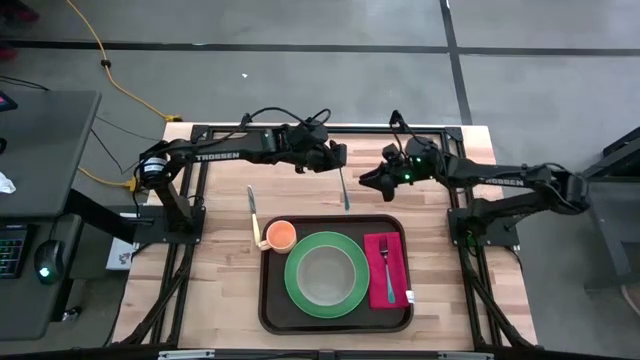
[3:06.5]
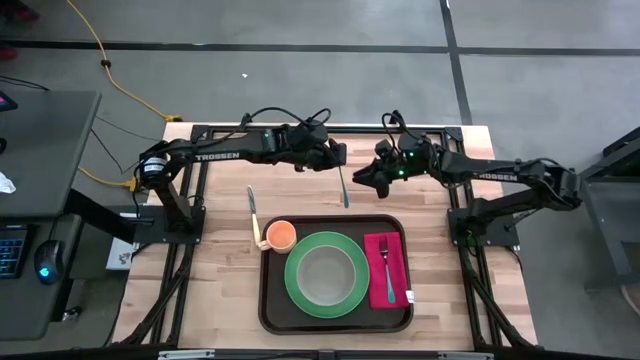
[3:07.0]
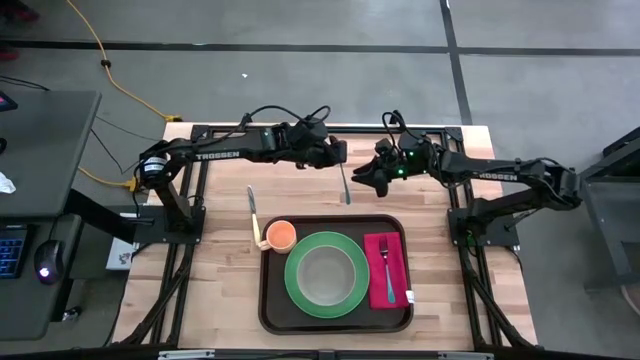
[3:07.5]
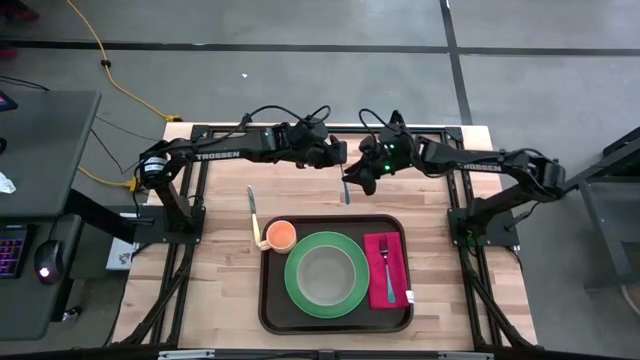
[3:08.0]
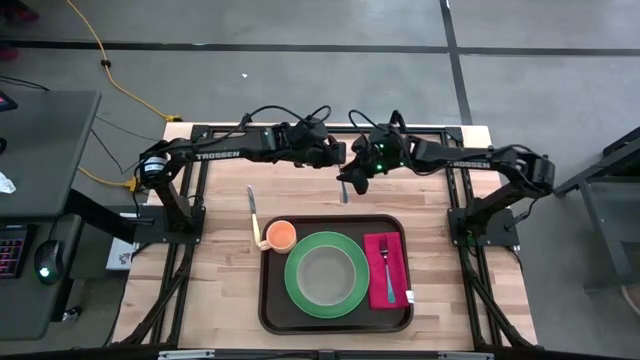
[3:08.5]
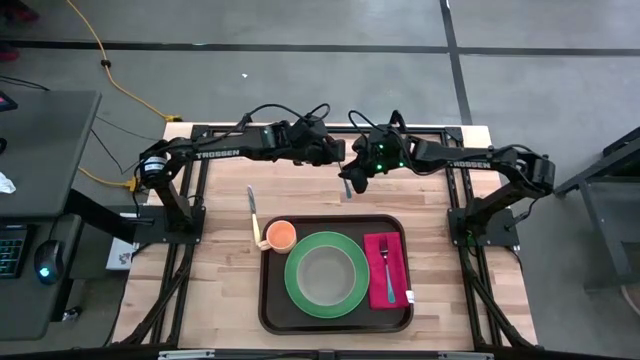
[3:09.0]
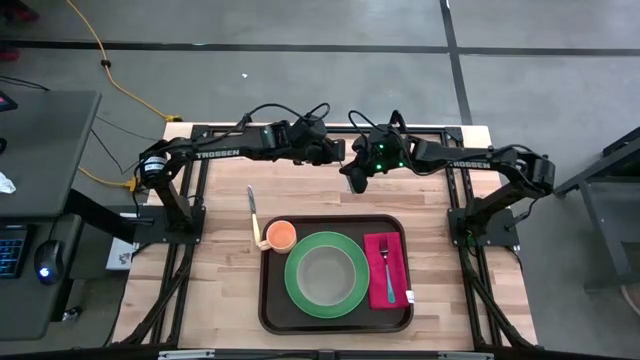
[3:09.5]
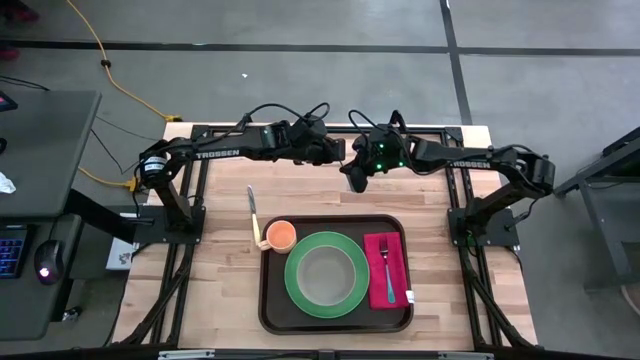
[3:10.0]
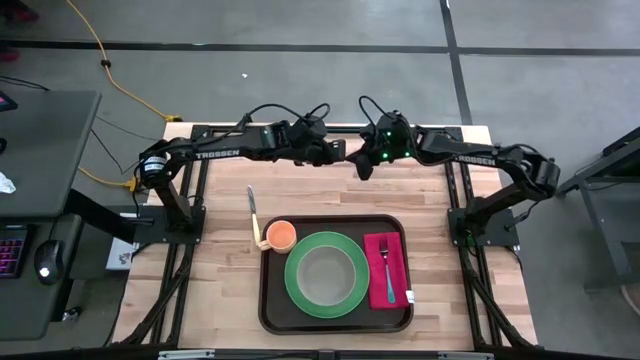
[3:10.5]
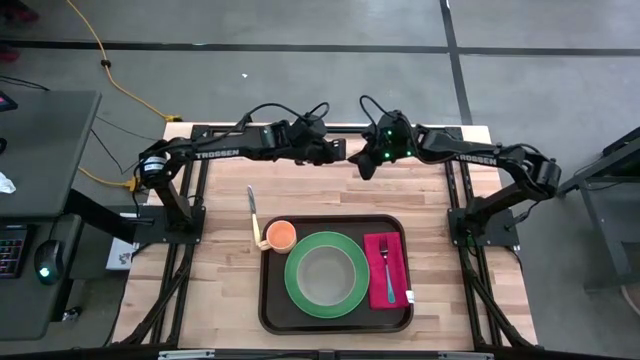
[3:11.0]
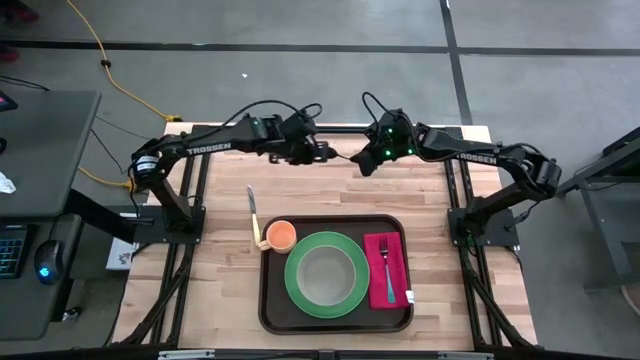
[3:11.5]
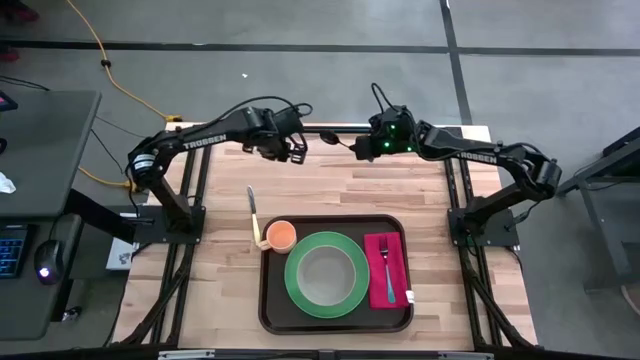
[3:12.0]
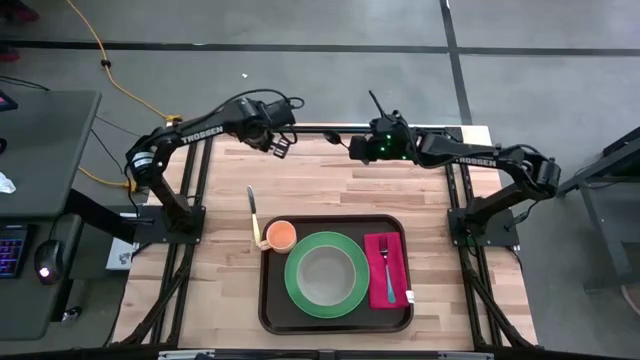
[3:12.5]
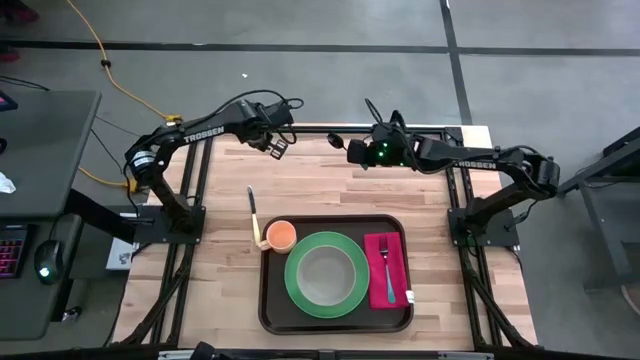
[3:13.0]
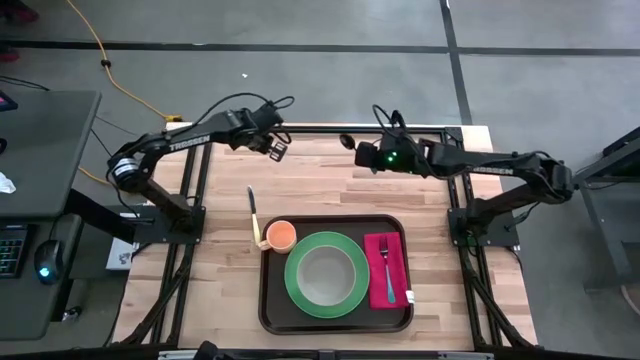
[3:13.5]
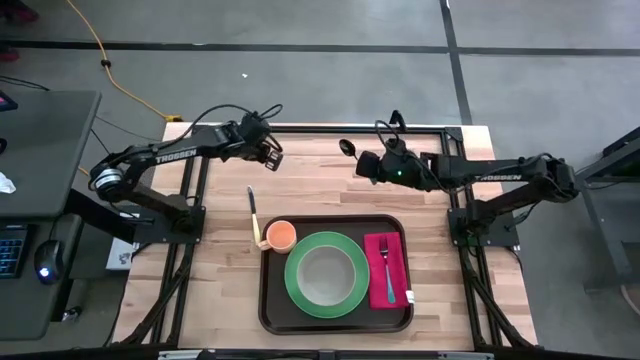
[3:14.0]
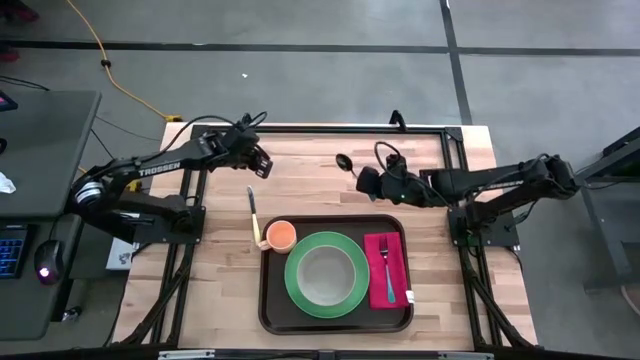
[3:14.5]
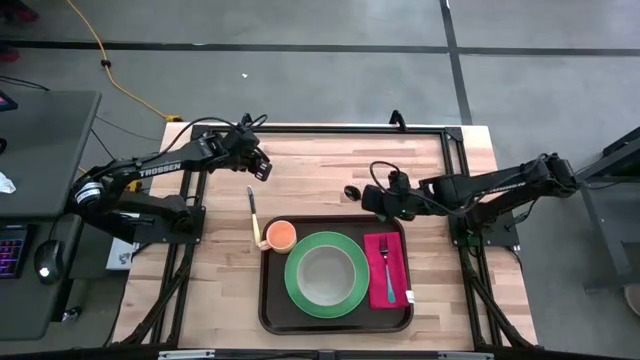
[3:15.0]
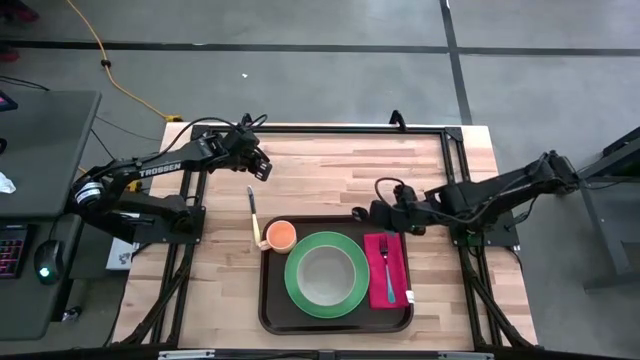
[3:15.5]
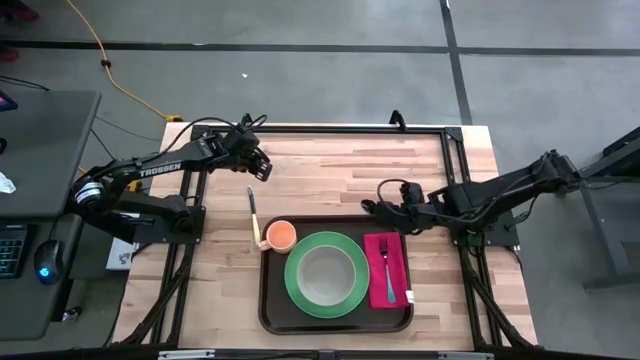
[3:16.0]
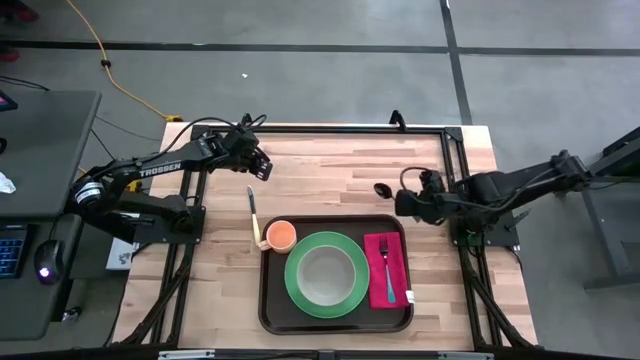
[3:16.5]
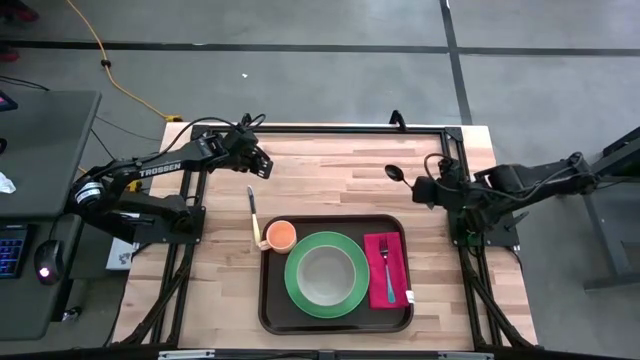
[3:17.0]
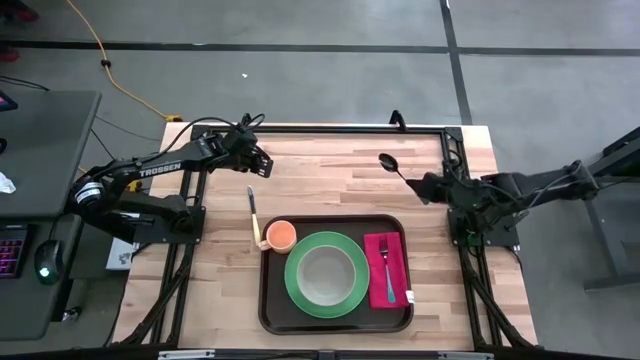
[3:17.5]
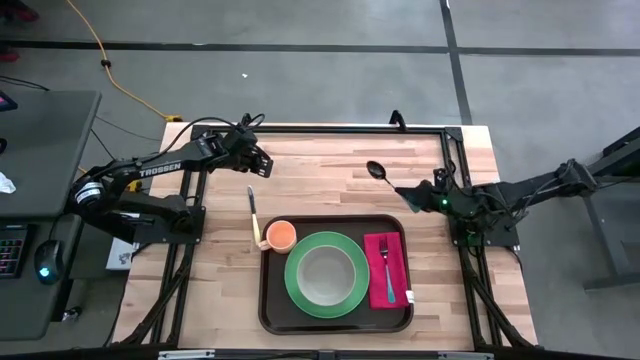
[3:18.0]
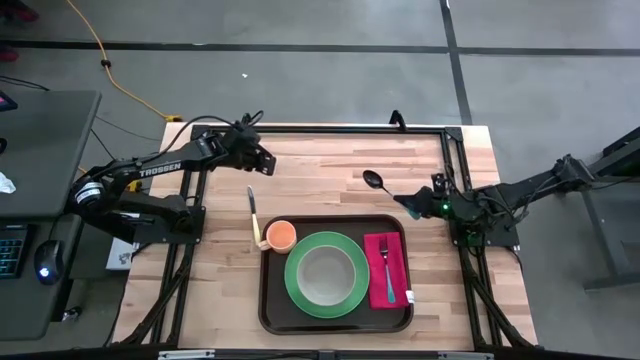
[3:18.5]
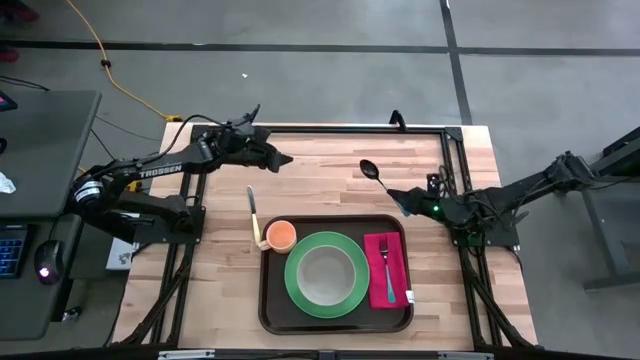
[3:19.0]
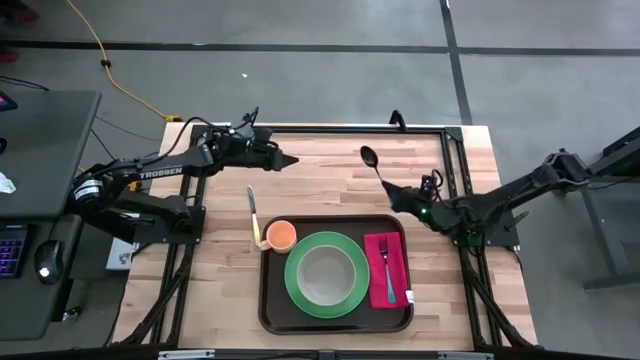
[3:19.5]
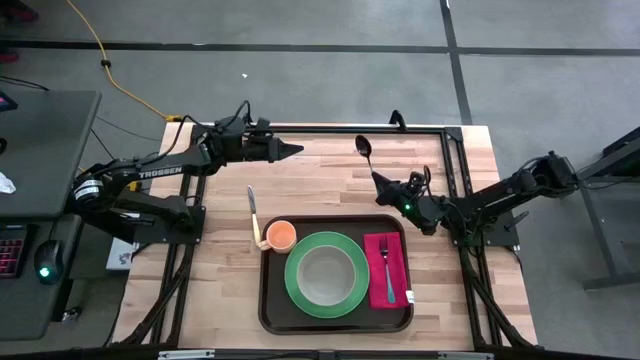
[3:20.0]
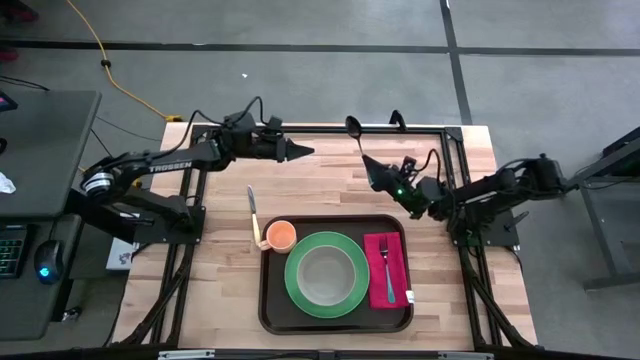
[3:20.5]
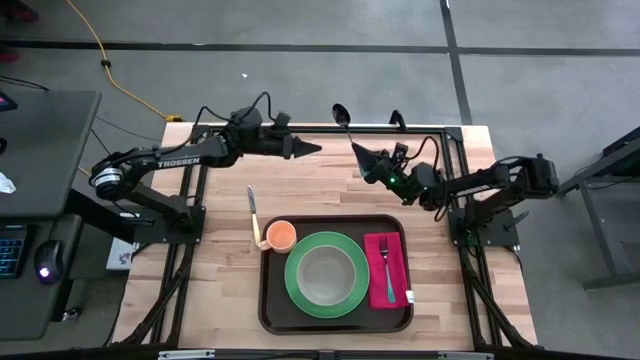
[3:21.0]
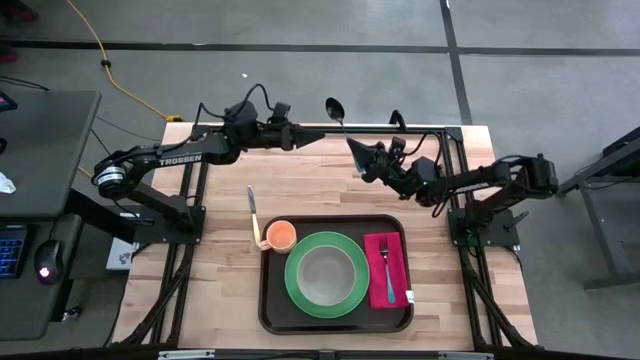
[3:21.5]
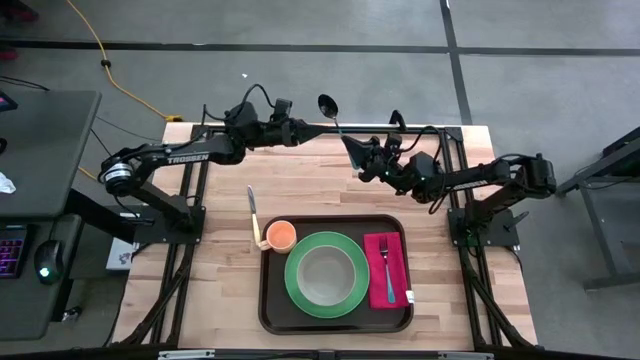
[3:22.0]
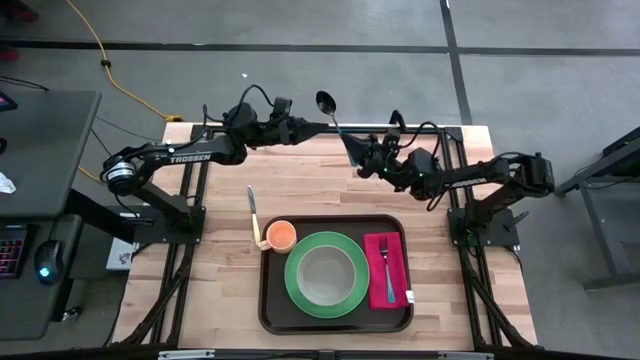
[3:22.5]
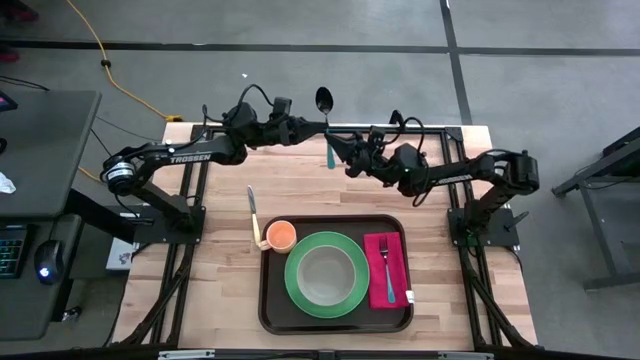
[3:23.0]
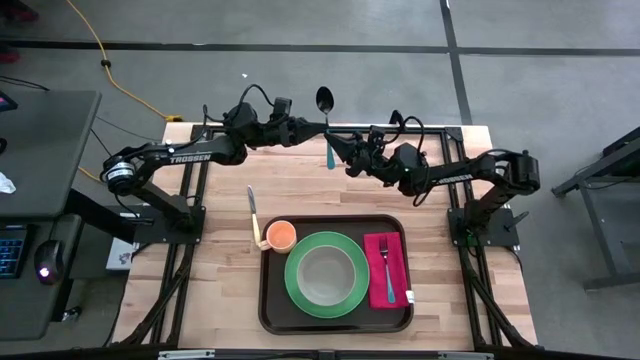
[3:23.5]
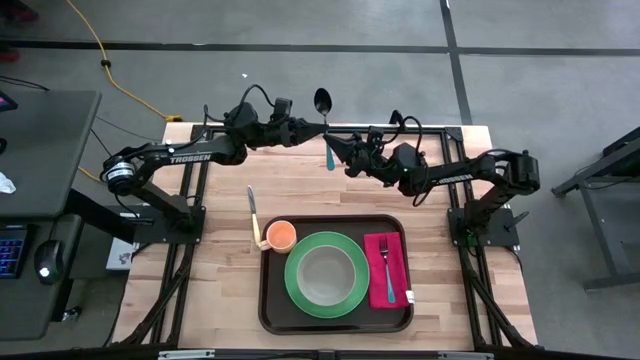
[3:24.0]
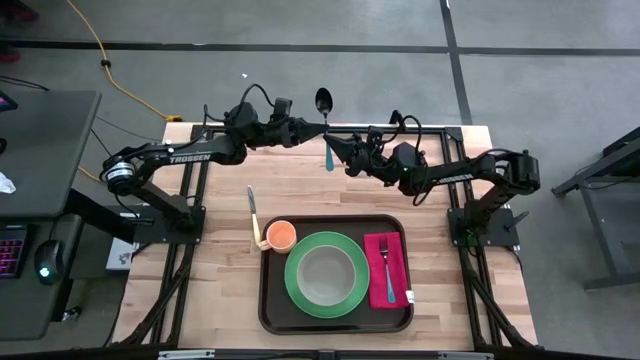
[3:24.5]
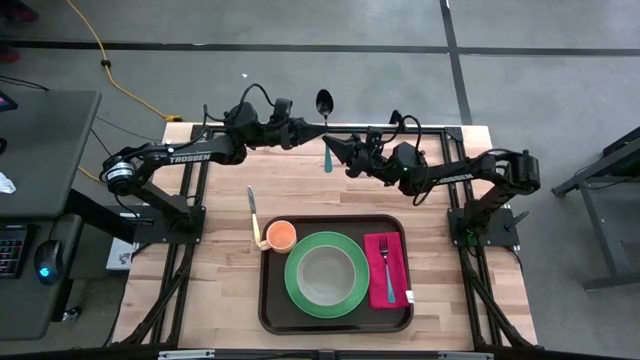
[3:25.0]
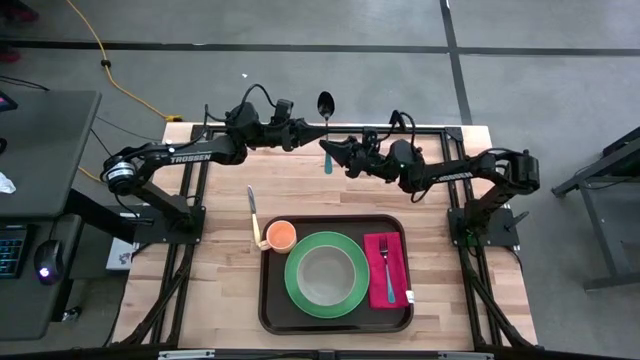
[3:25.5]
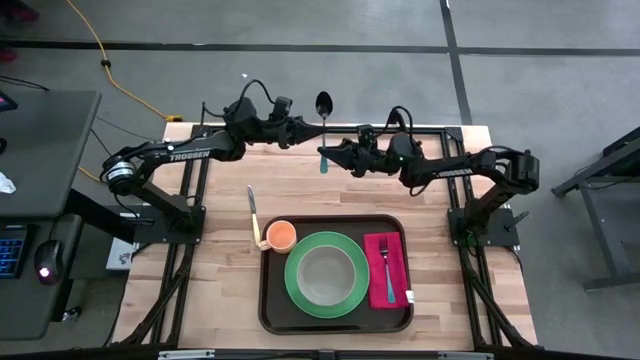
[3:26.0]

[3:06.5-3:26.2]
Task: Set up tray
Put the blue spoon on top of the red napkin to the left of the blue fork on the black tray
